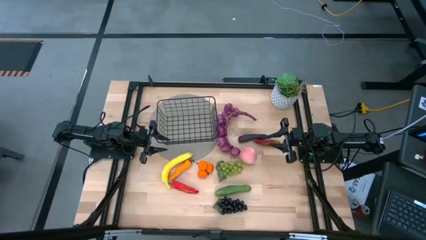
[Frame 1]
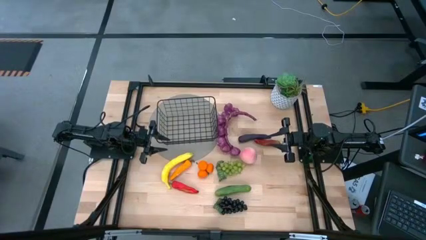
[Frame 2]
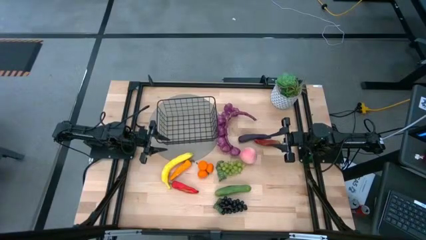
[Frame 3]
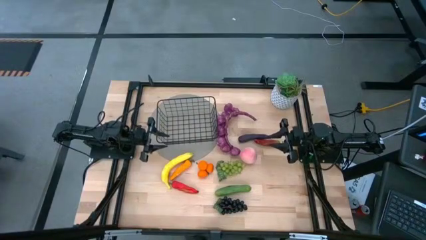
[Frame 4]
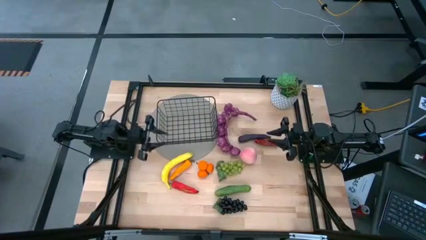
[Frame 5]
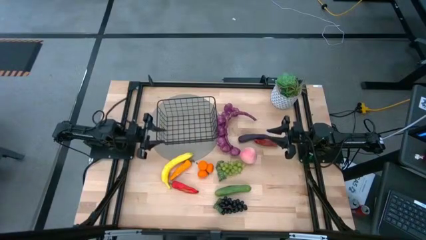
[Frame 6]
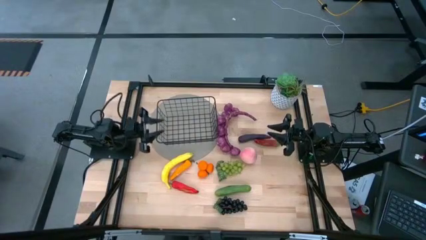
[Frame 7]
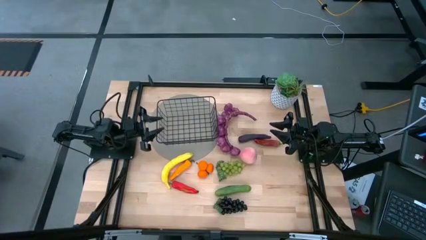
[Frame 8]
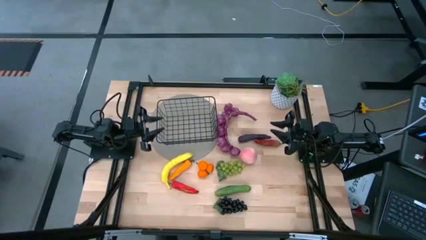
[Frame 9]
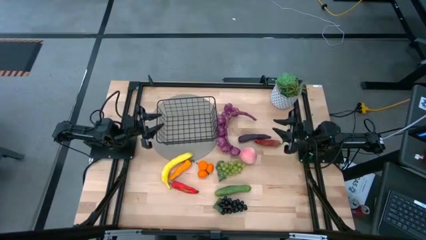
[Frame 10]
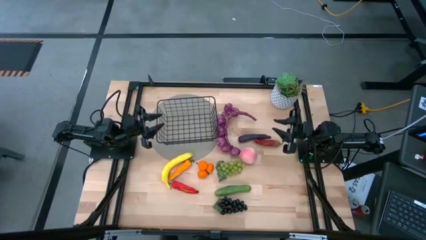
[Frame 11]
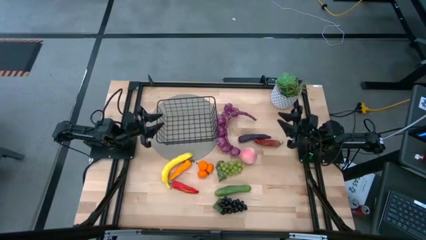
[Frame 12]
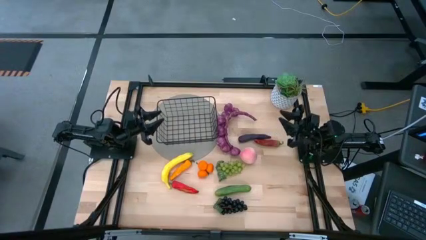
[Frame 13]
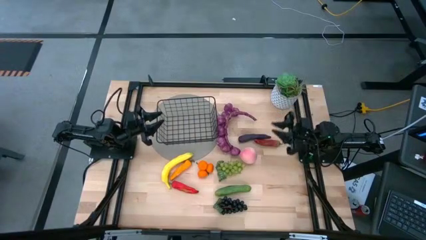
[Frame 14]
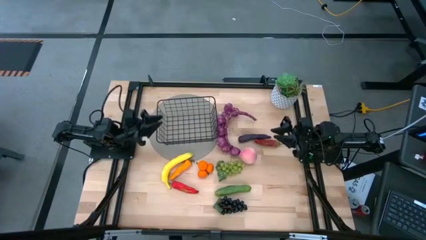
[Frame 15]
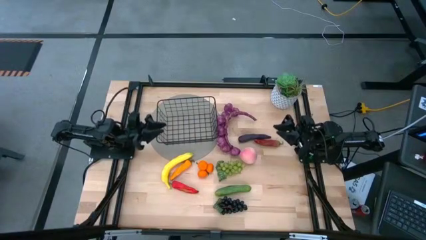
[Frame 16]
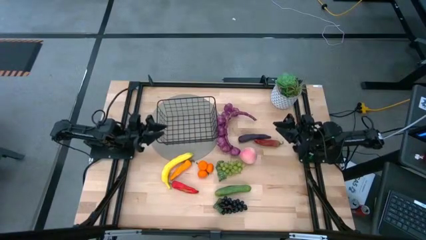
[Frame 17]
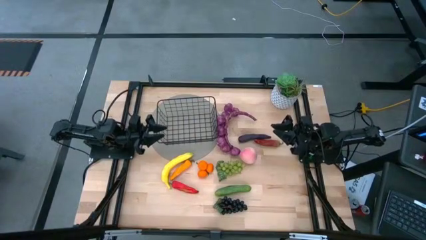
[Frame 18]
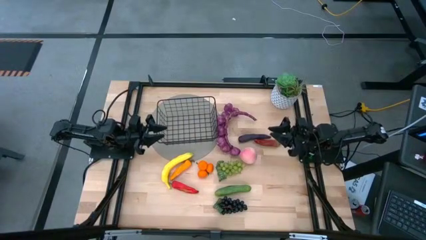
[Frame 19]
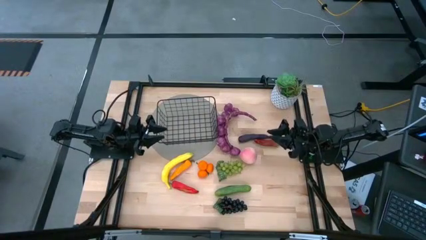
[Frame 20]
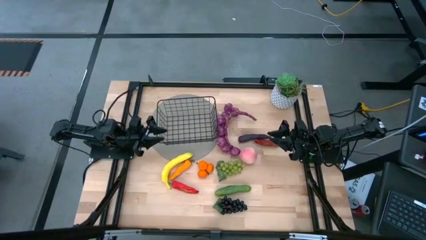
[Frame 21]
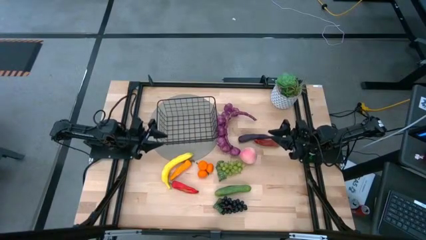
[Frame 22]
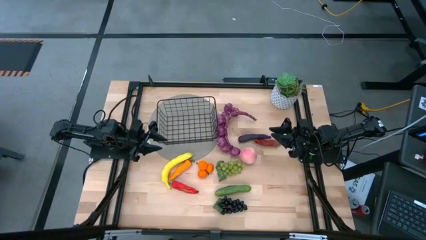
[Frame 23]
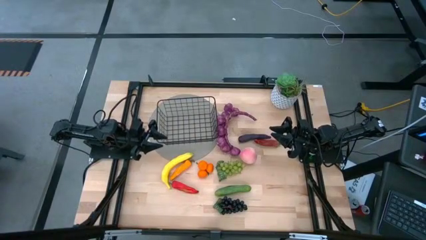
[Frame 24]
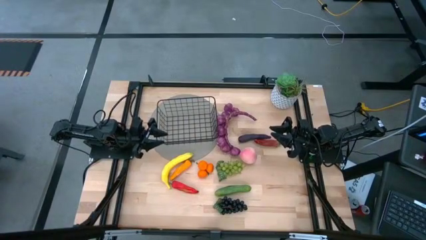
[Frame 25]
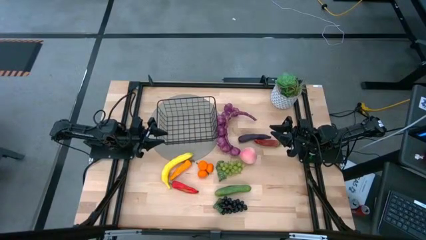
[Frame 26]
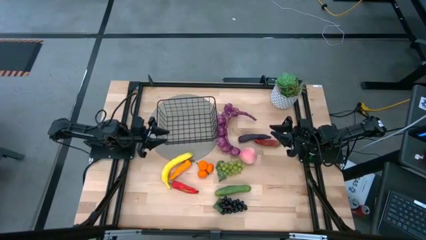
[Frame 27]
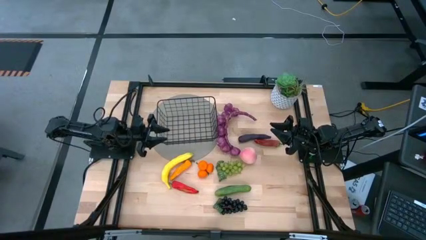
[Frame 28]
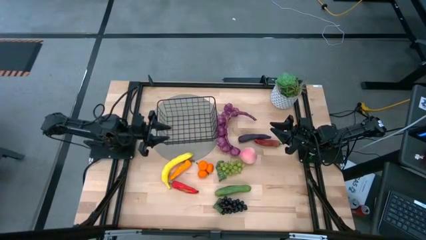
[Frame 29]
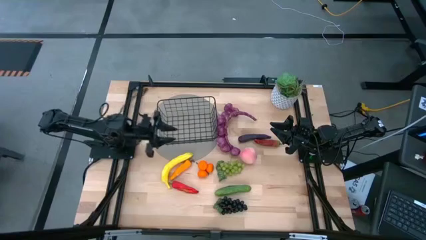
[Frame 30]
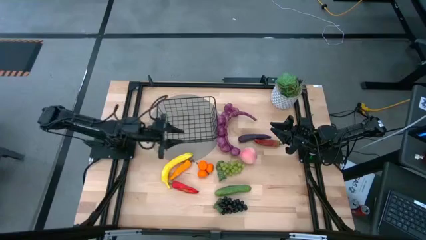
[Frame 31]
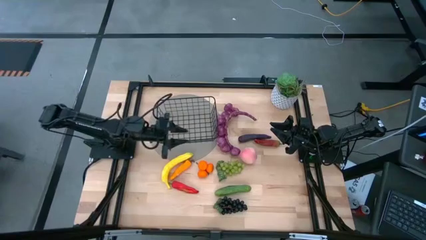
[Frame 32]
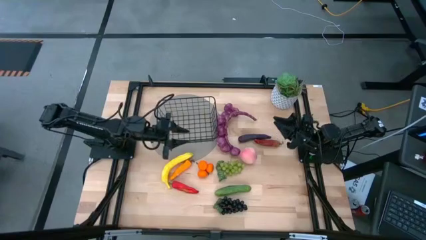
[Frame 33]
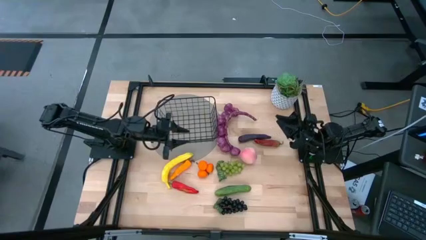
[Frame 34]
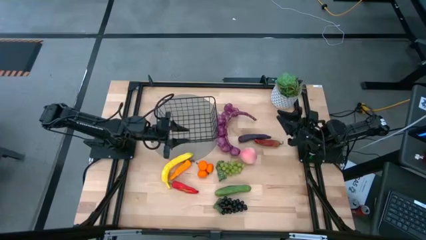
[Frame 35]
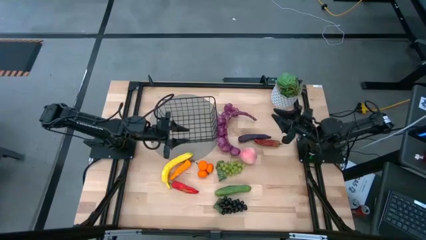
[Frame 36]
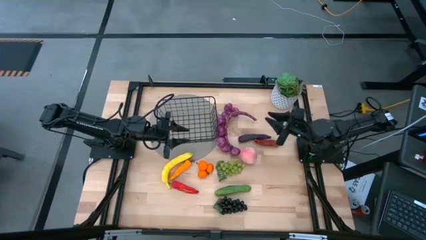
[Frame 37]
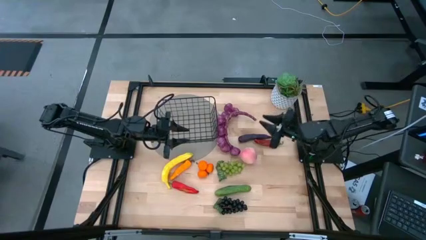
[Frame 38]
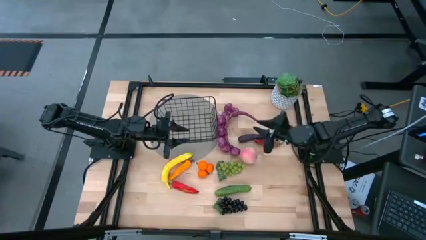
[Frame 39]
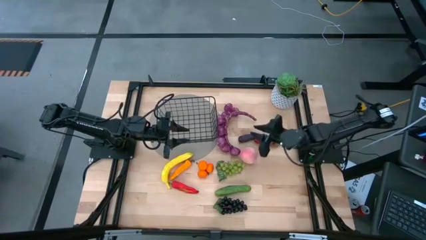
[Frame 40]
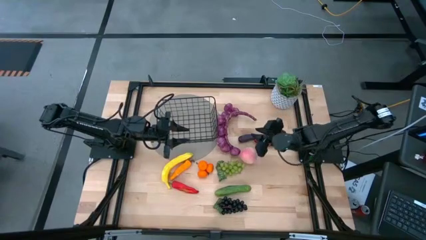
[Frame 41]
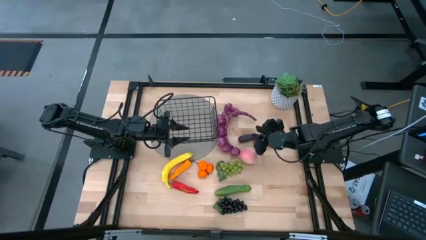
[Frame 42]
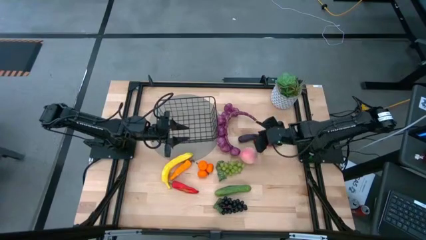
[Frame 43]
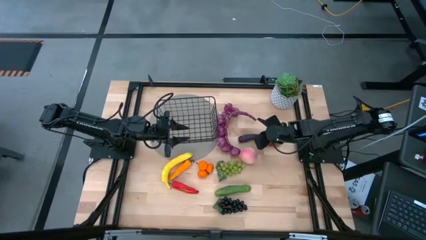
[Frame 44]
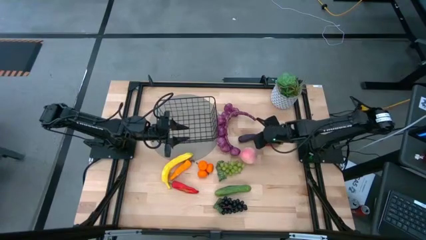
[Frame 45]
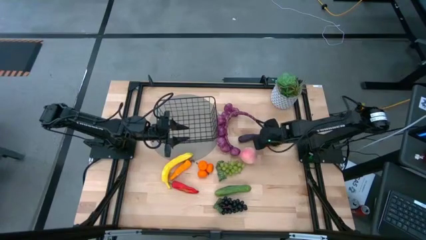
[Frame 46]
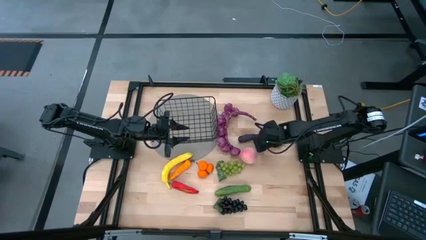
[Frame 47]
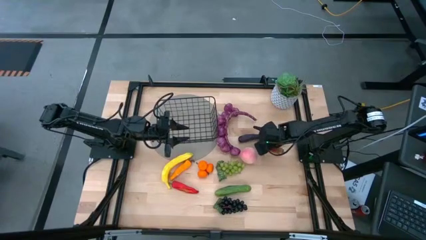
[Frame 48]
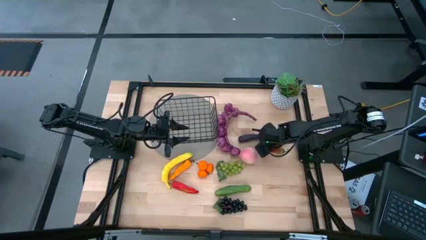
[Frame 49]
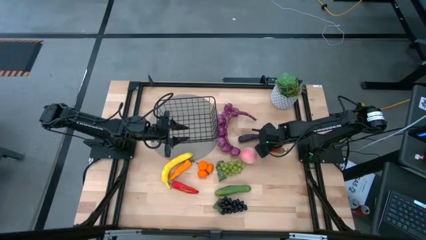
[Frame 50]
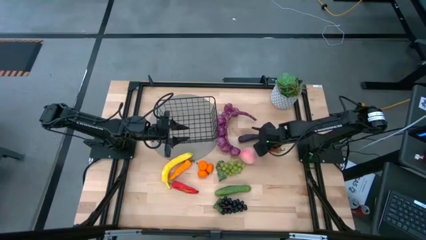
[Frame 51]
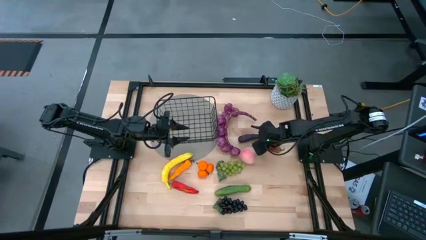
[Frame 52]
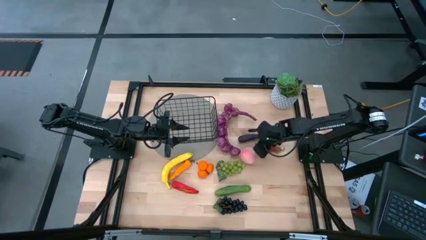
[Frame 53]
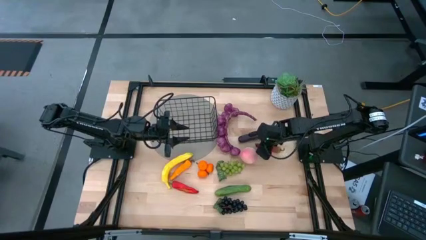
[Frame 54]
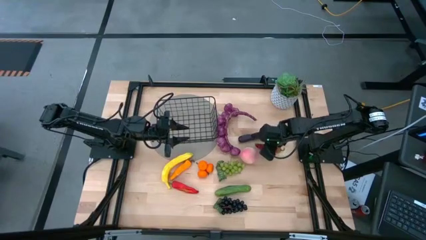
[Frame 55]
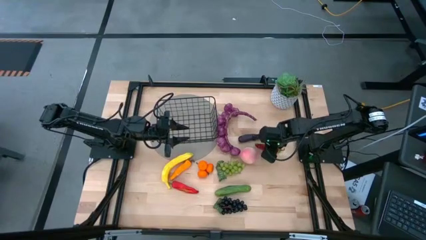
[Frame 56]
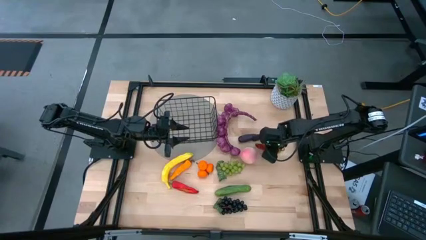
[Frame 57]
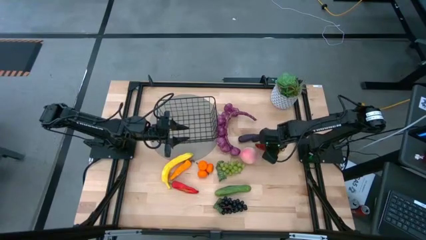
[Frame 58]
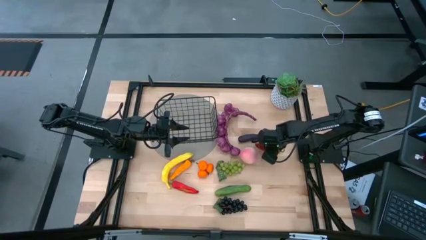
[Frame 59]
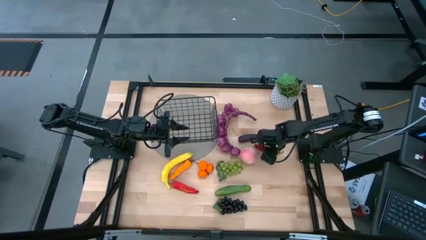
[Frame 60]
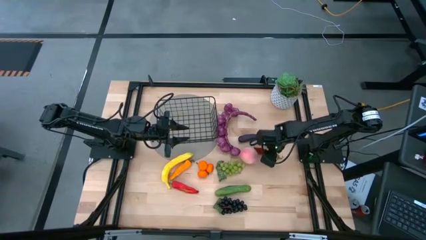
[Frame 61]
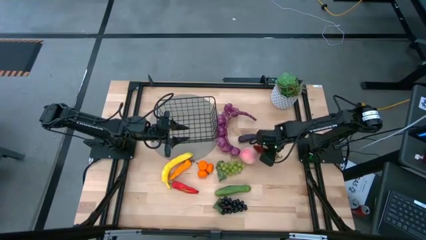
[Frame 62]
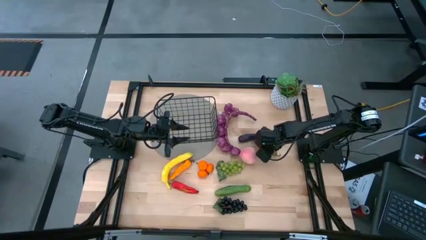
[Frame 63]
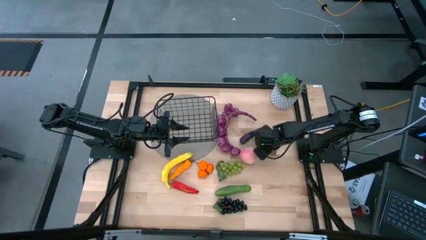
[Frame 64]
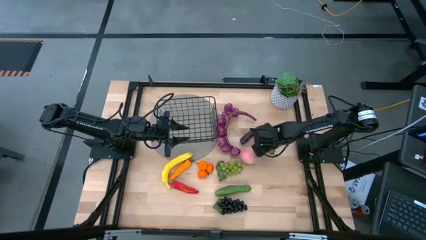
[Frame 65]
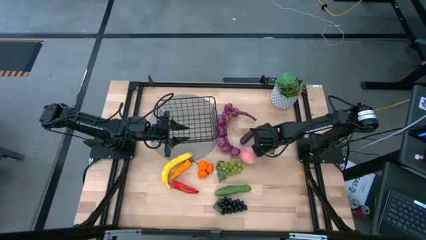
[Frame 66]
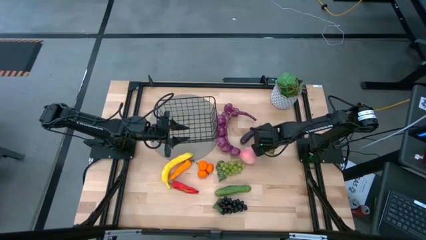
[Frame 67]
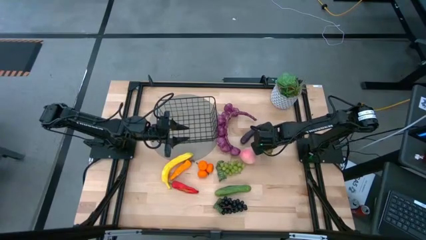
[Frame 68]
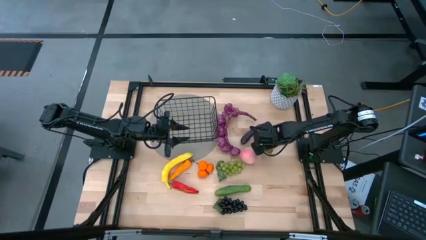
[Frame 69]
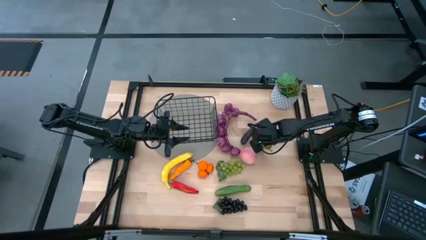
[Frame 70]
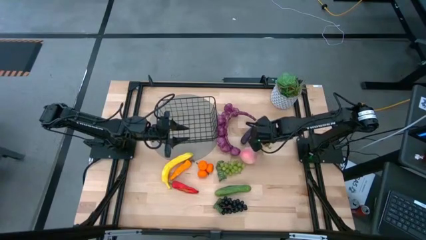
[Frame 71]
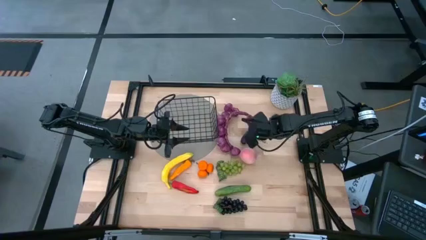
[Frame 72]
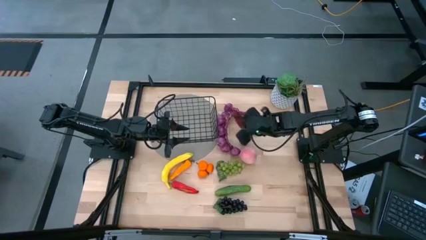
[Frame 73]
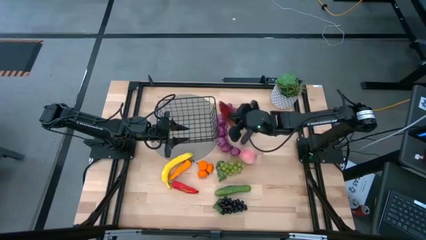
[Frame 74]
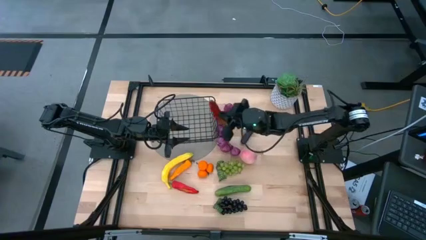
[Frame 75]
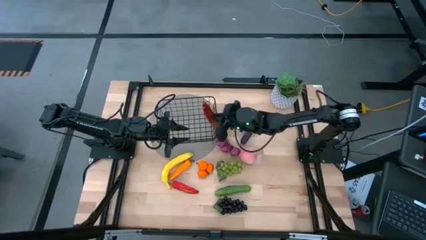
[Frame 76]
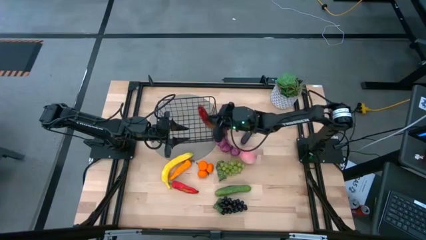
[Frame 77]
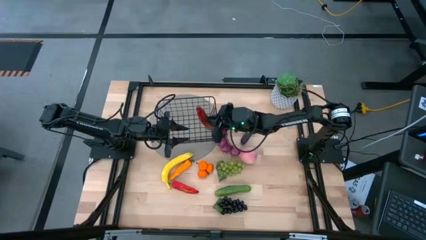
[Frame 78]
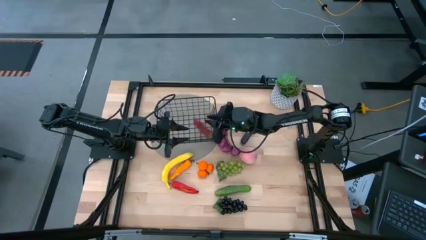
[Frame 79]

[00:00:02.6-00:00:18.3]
Task: Build produce basket
Put the right red chili pepper into the wire basket
